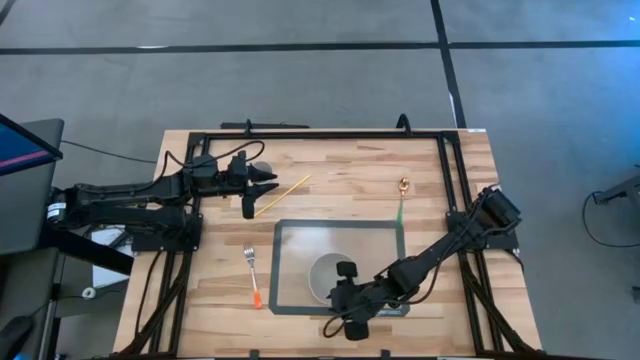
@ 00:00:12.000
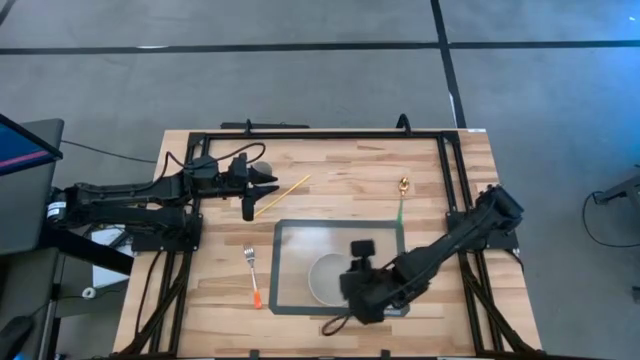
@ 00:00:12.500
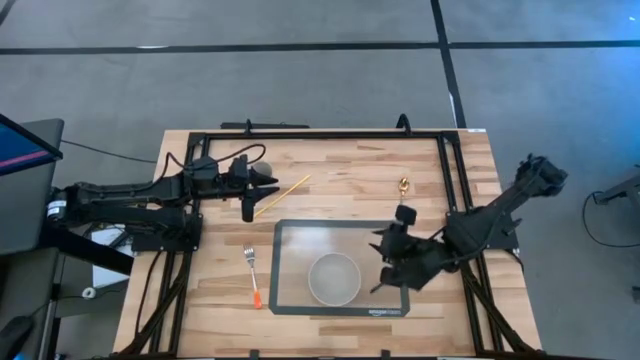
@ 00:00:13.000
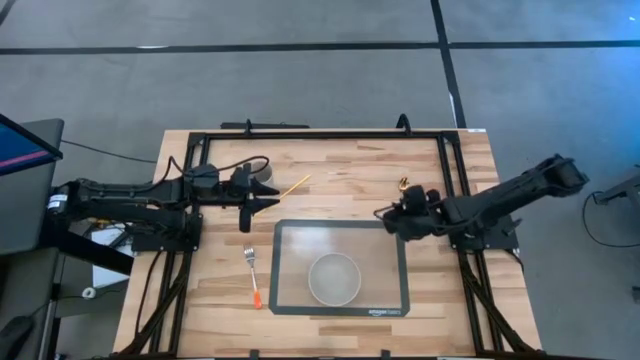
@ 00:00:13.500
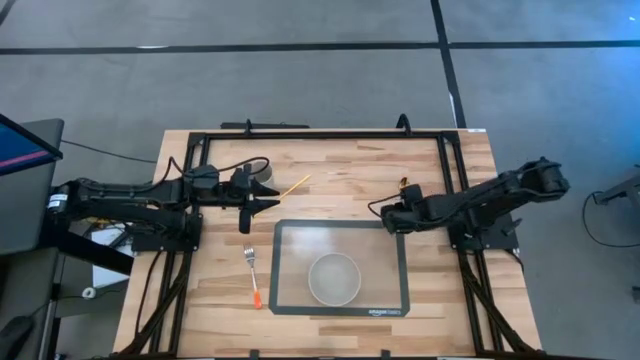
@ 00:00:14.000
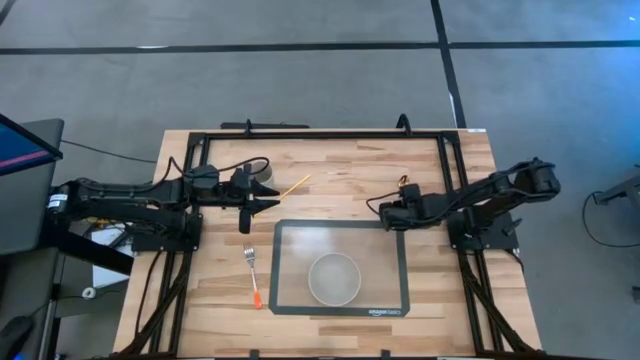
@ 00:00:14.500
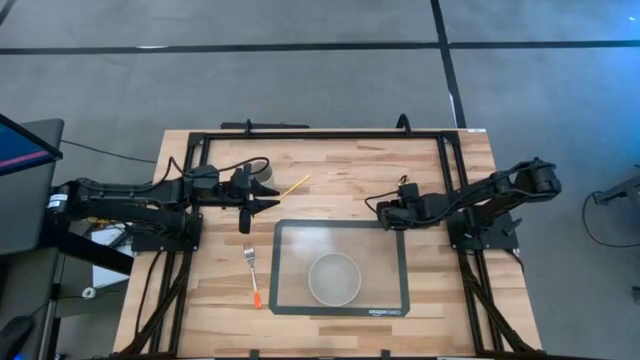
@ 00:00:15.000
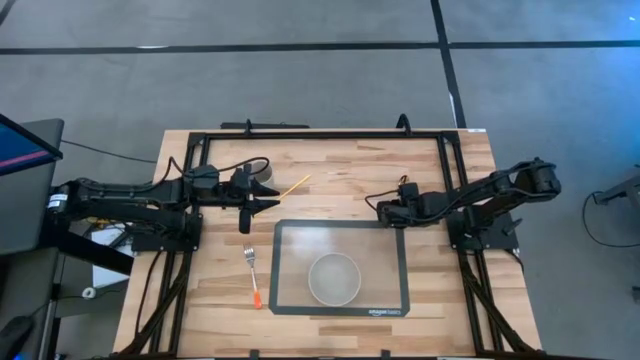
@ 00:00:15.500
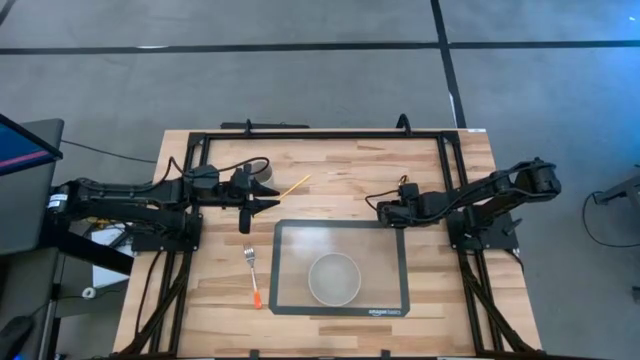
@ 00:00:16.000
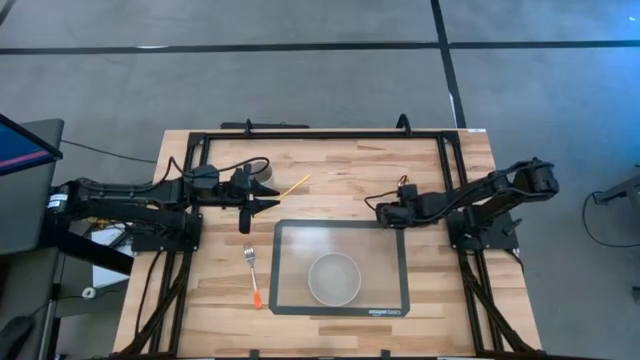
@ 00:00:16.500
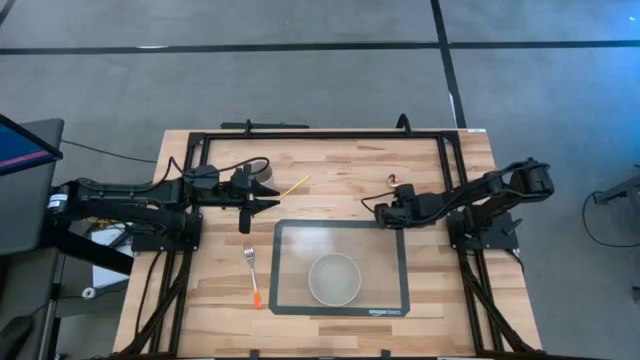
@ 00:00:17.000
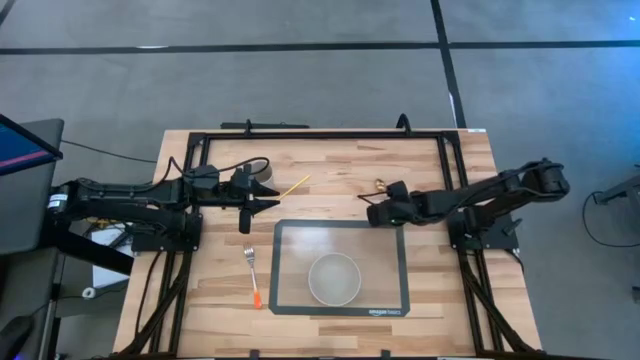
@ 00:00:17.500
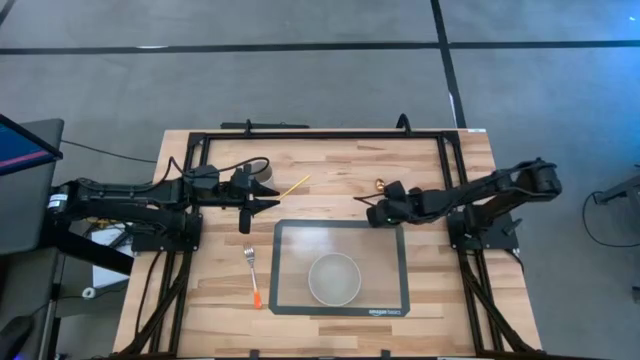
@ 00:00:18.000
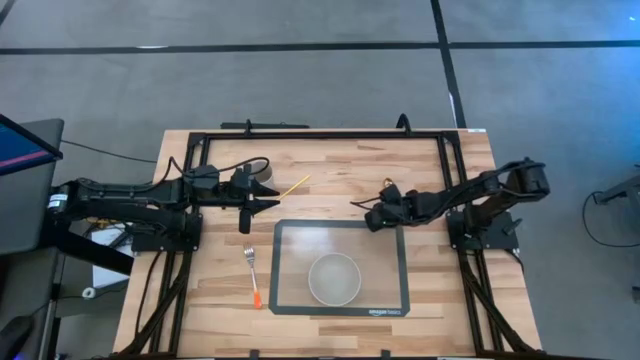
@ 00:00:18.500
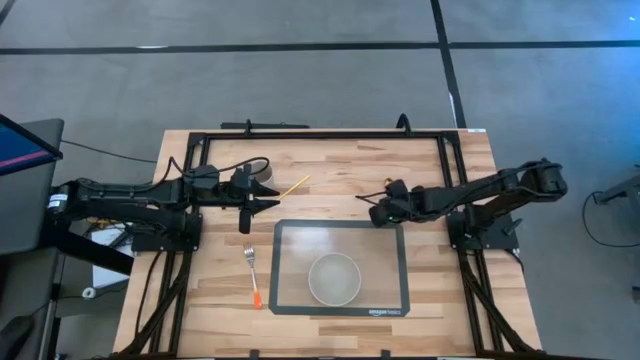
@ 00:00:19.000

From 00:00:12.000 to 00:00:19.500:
Task: Pick & Place Utensil
Put the green spoon into the gray bowl

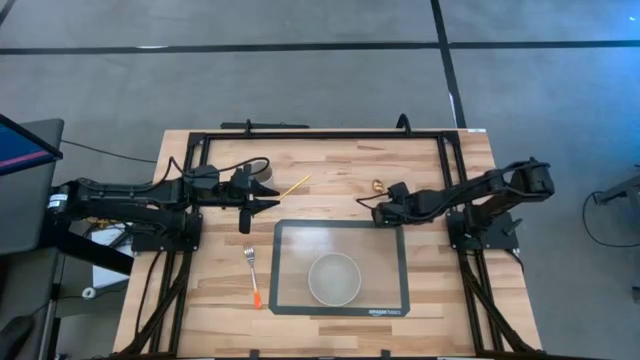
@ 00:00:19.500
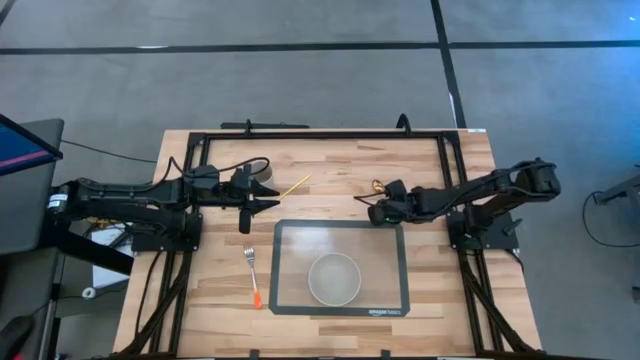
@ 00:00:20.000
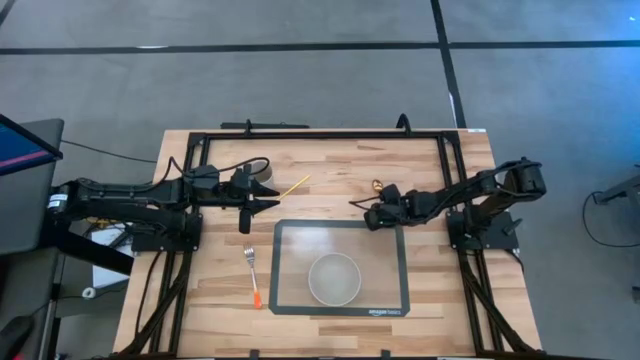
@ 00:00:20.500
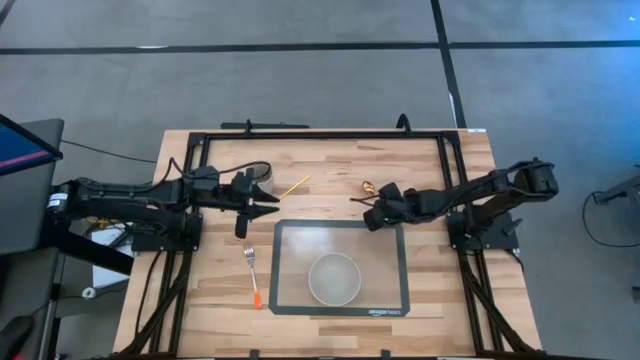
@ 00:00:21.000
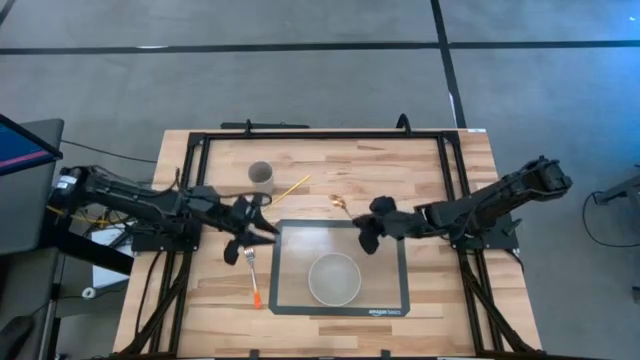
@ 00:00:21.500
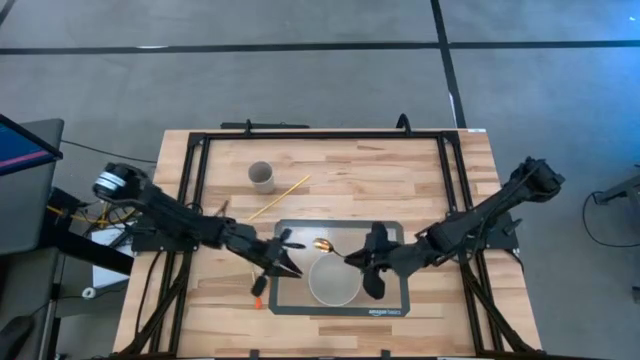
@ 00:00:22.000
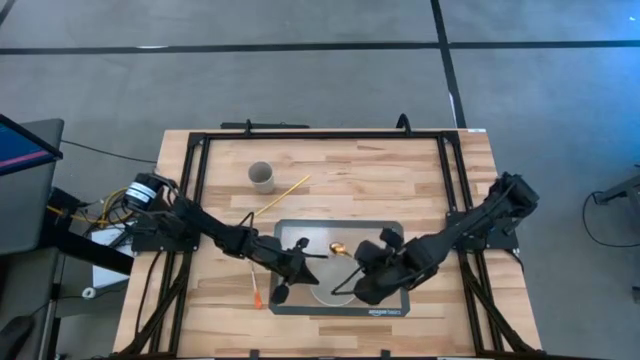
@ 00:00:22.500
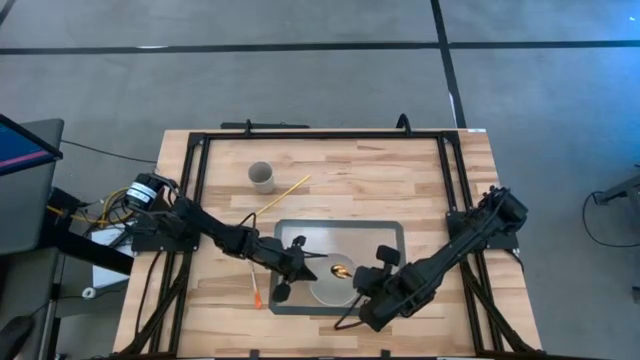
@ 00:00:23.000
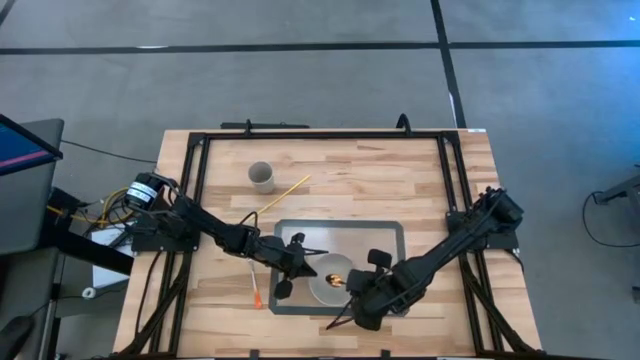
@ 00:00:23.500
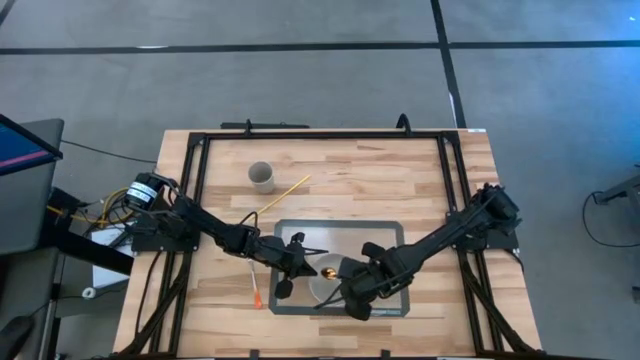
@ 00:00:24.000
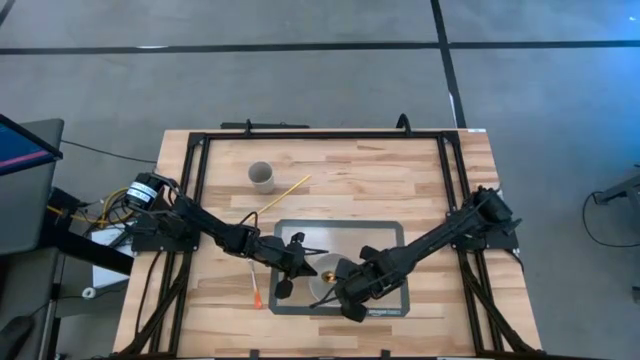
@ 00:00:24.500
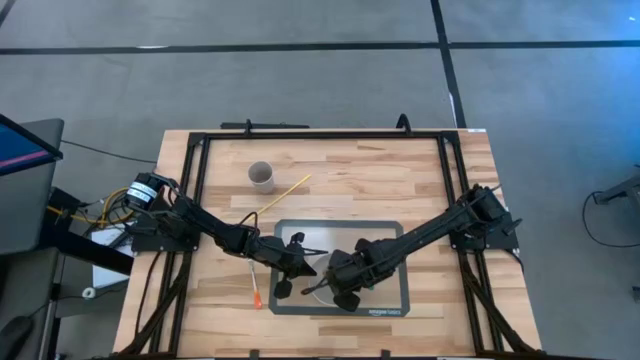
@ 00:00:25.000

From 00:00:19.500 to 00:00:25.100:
Put the green spoon into the gray bowl

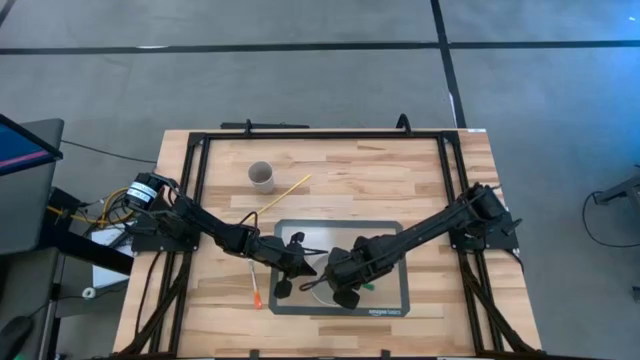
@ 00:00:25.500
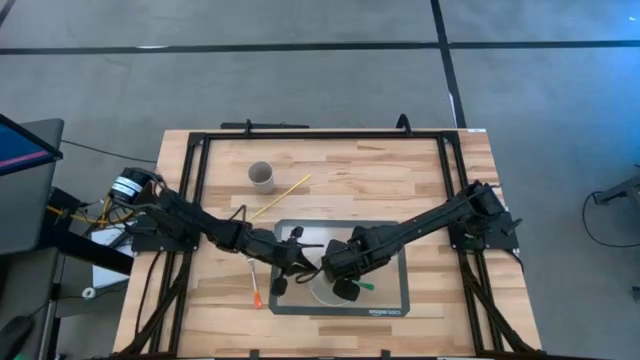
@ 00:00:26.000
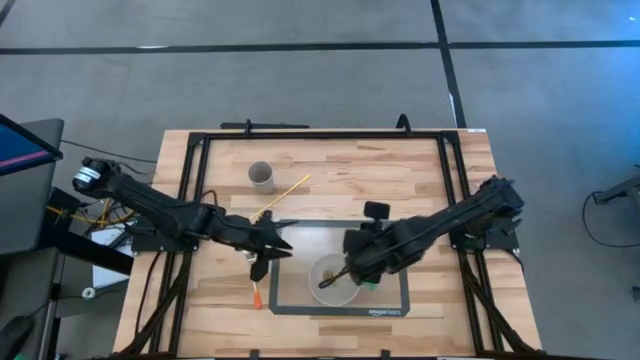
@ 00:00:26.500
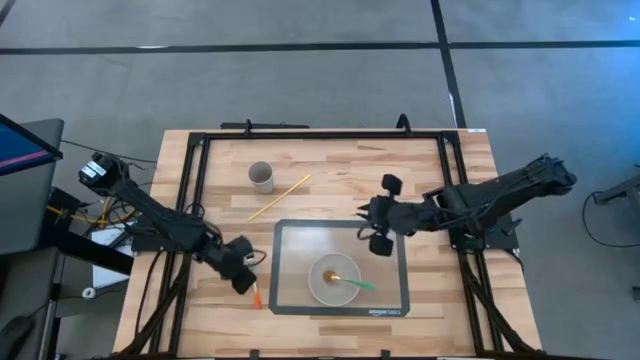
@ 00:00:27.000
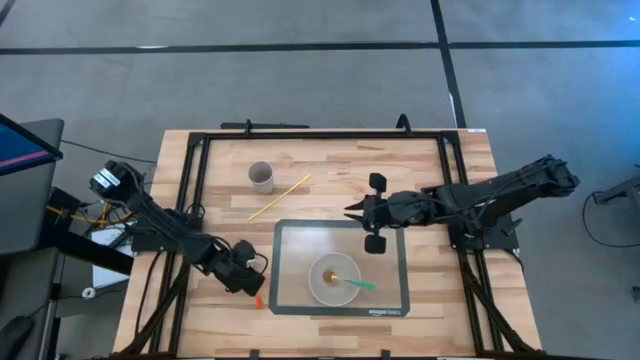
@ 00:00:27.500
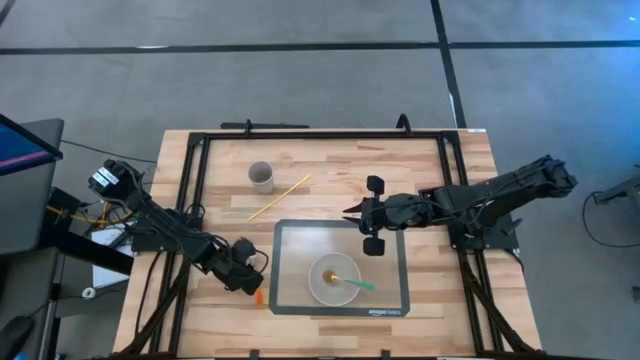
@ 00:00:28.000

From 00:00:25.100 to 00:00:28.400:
Put the orange fork into the gray bowl

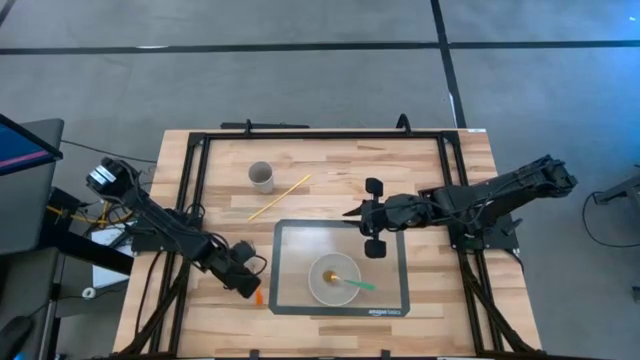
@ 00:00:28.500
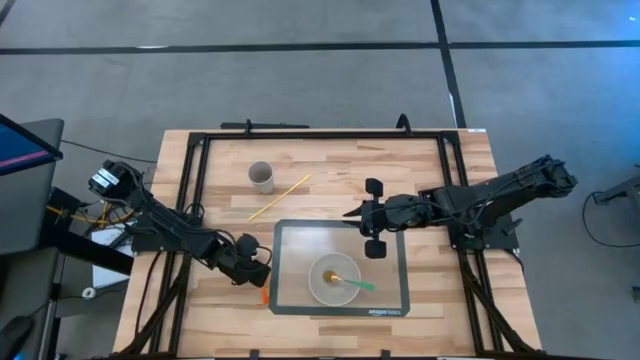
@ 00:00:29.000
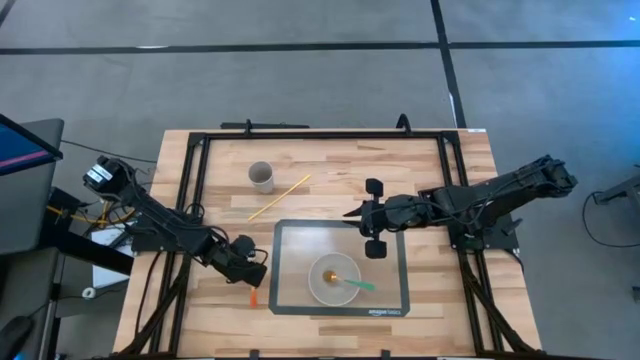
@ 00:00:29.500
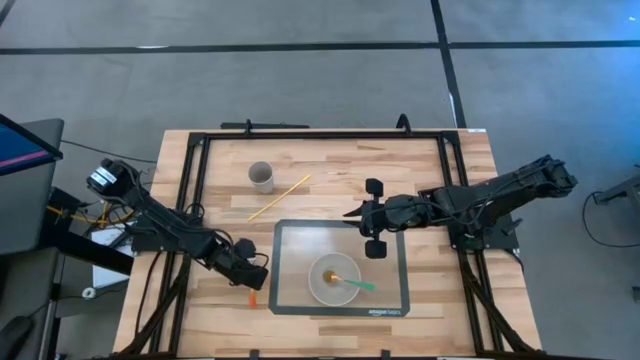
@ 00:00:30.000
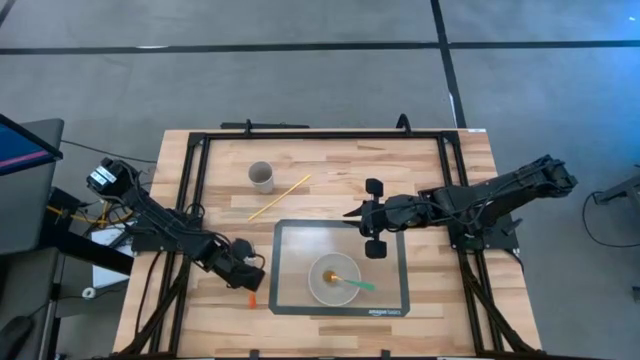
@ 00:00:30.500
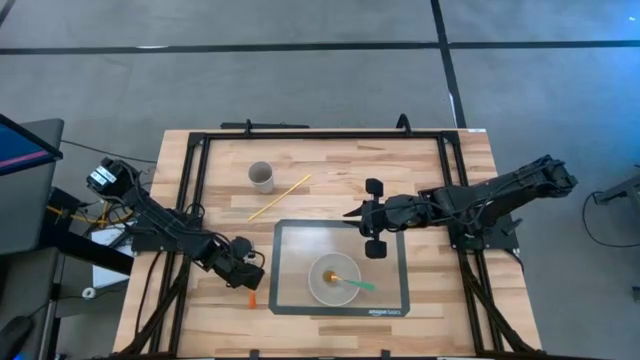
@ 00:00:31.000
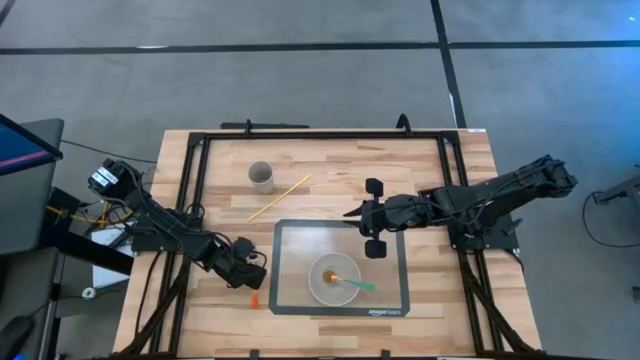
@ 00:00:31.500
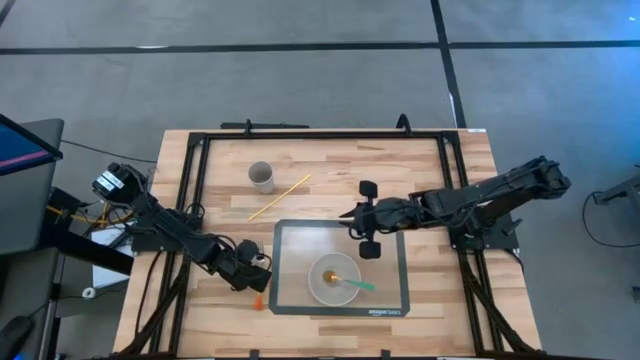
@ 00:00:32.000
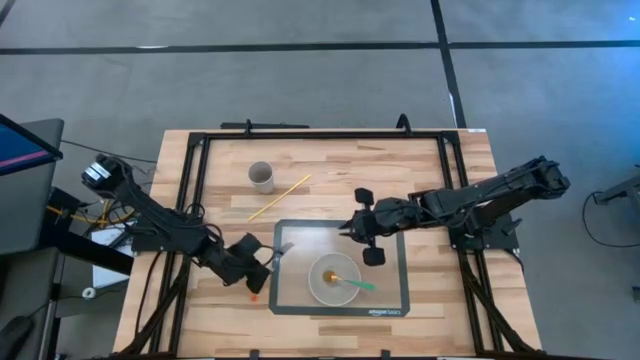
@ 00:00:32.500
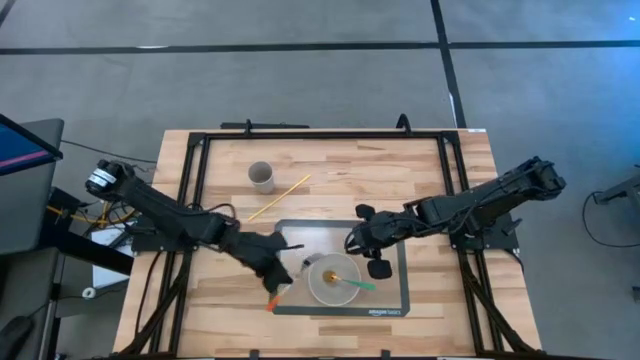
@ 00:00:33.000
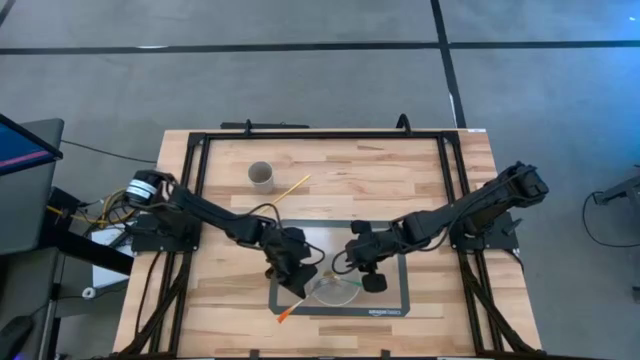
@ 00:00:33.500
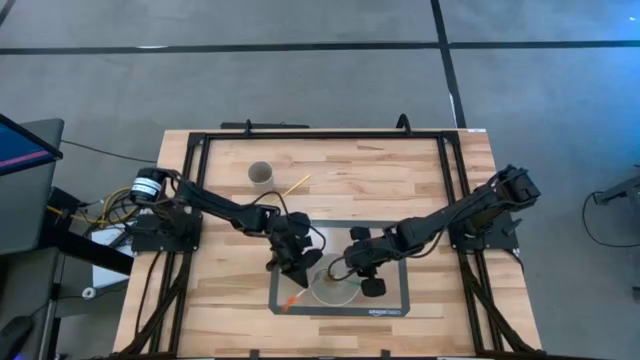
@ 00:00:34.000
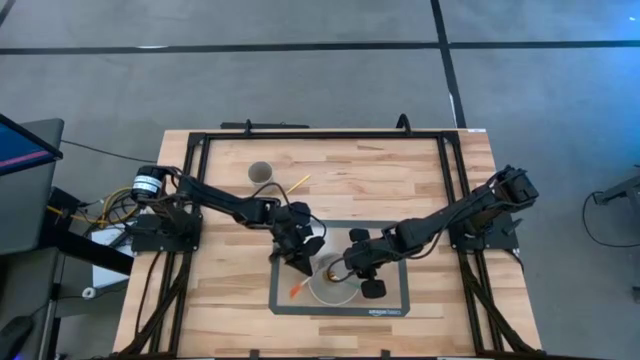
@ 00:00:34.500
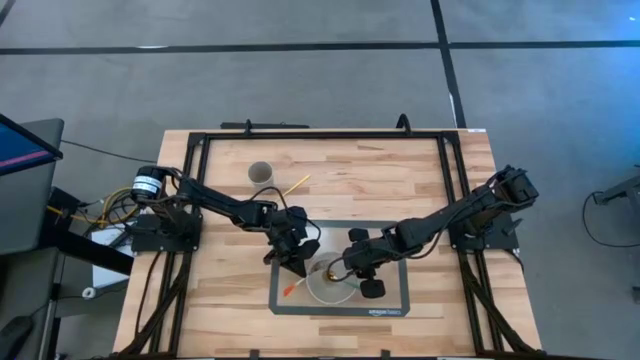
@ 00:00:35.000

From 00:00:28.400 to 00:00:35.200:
Put the orange fork into the gray bowl
